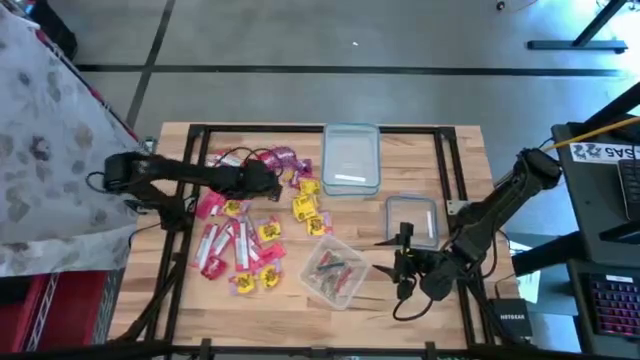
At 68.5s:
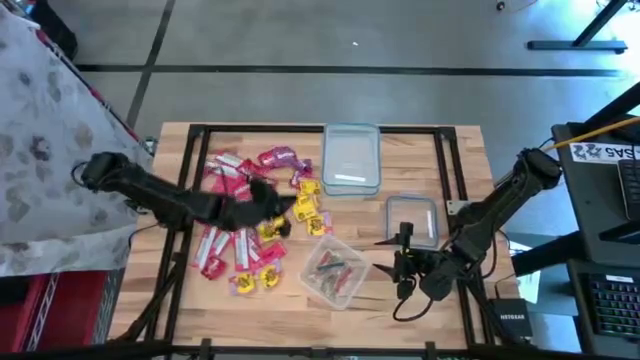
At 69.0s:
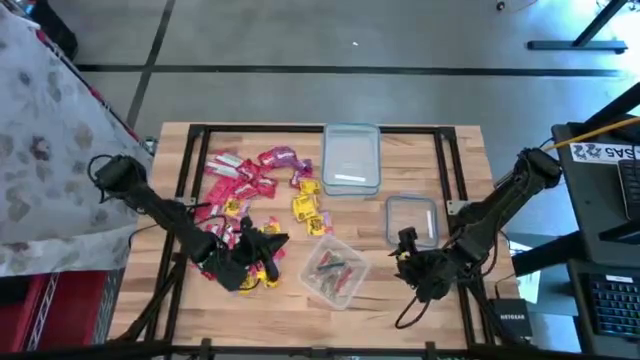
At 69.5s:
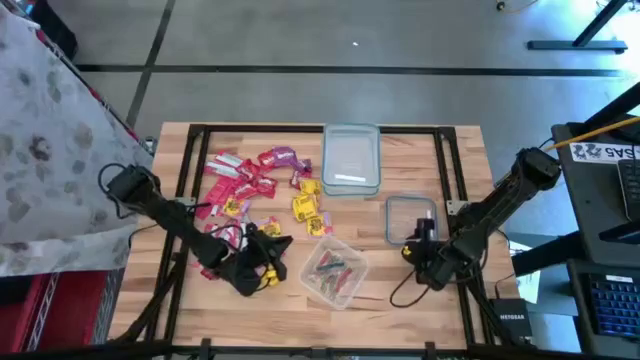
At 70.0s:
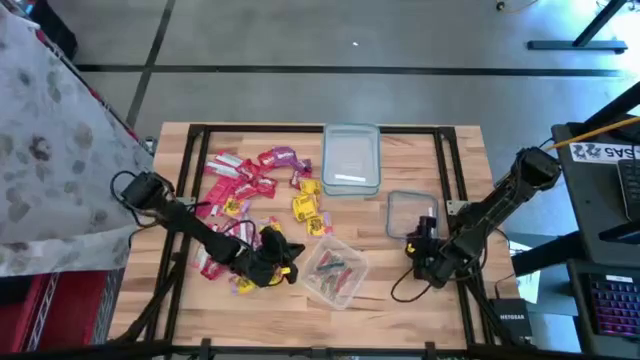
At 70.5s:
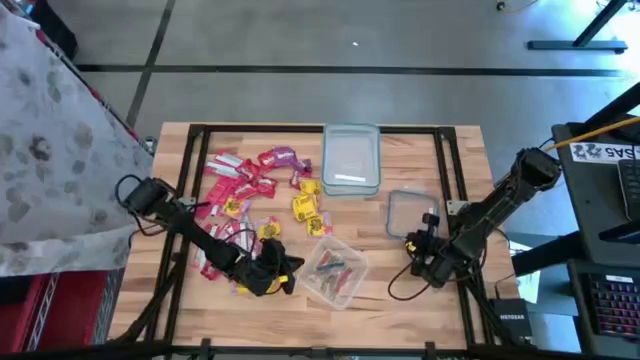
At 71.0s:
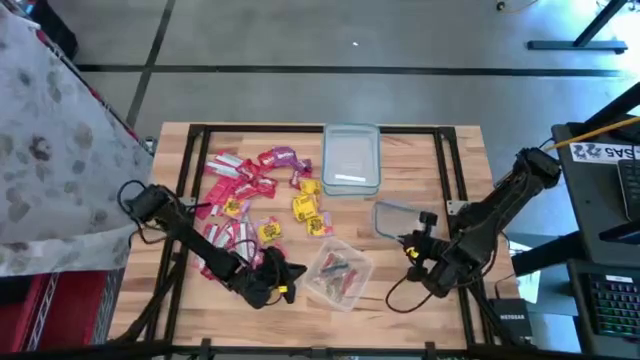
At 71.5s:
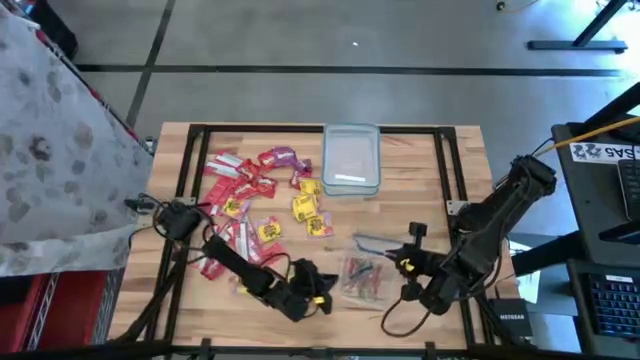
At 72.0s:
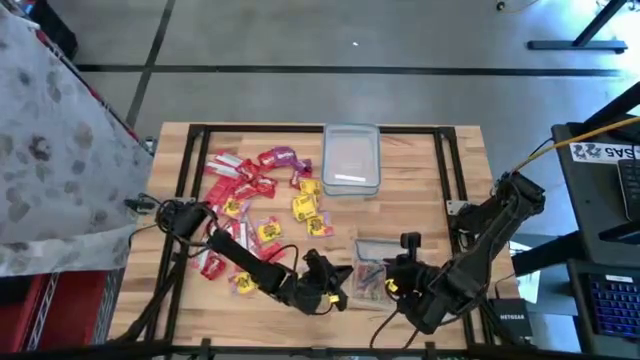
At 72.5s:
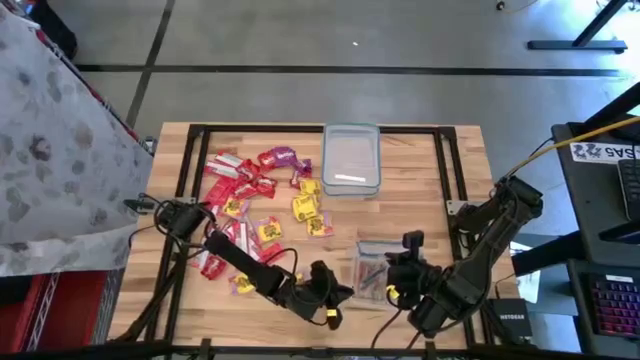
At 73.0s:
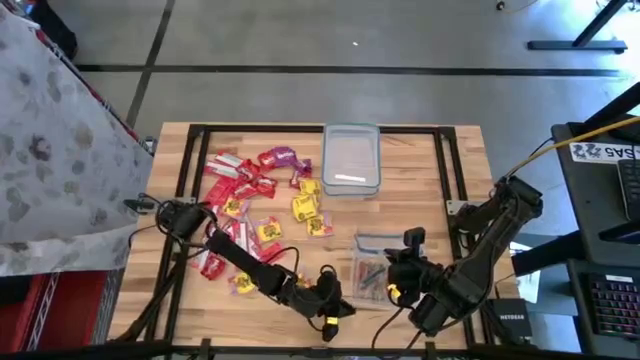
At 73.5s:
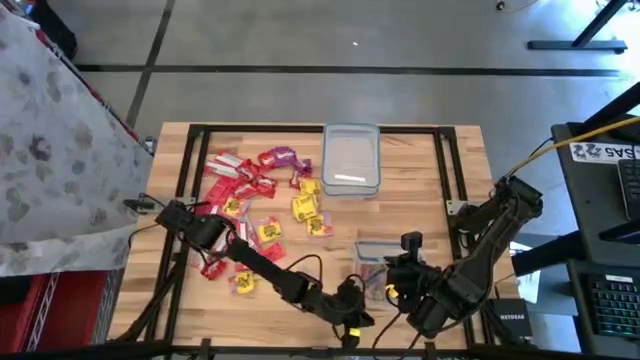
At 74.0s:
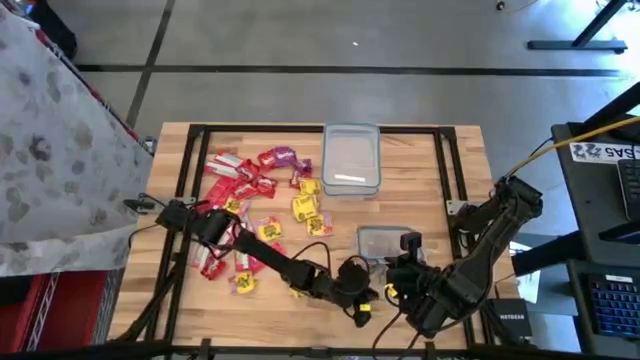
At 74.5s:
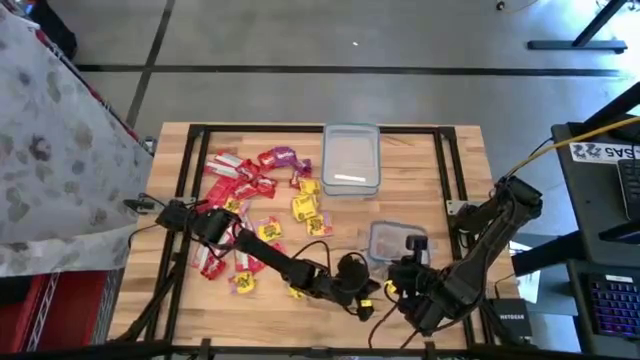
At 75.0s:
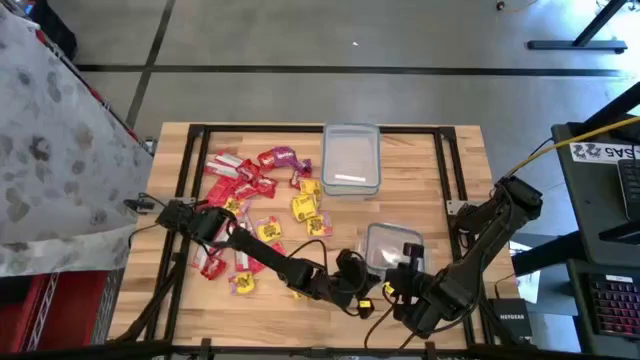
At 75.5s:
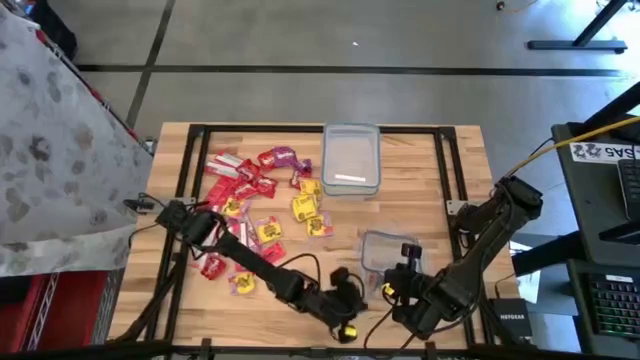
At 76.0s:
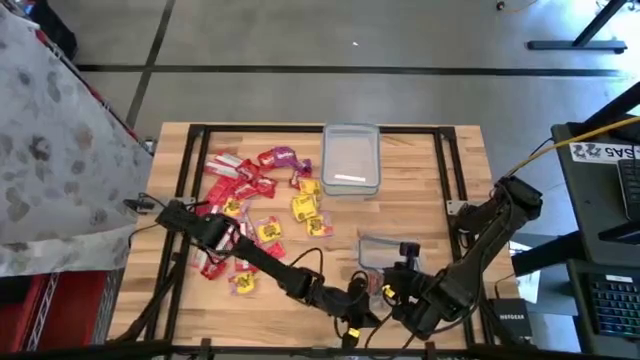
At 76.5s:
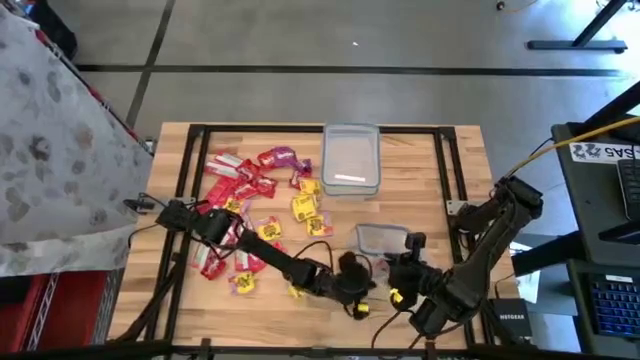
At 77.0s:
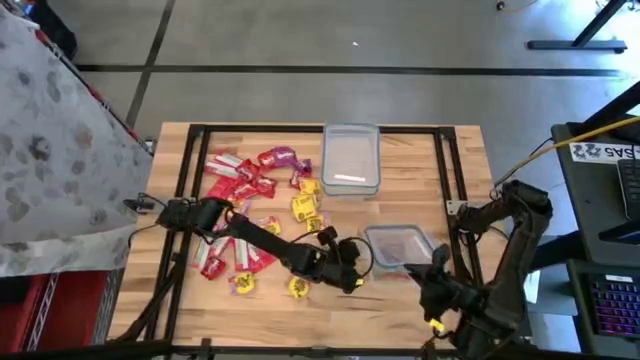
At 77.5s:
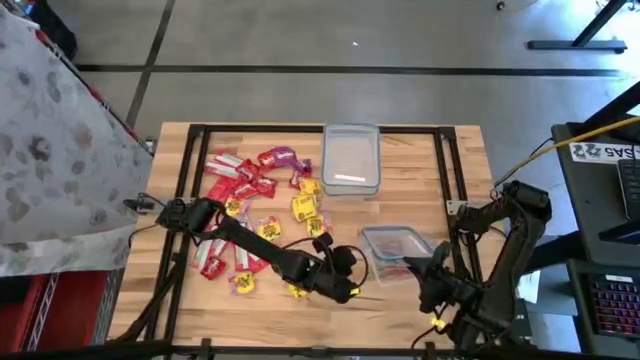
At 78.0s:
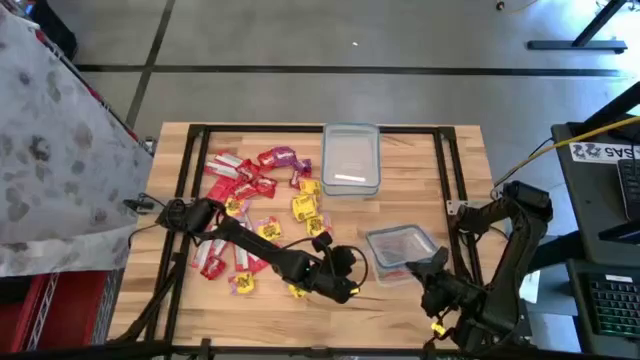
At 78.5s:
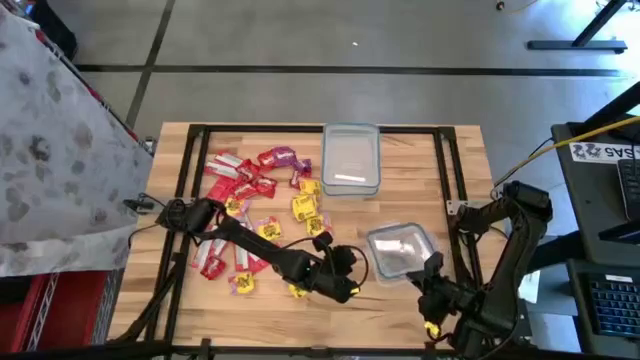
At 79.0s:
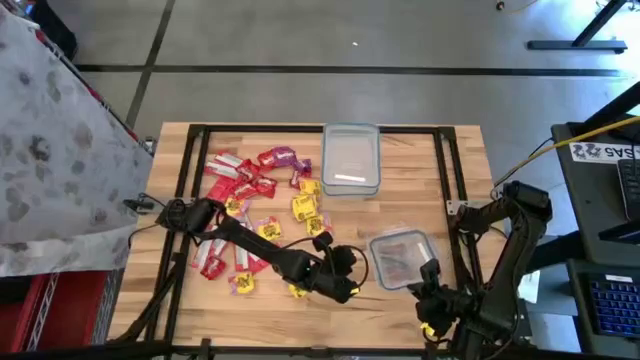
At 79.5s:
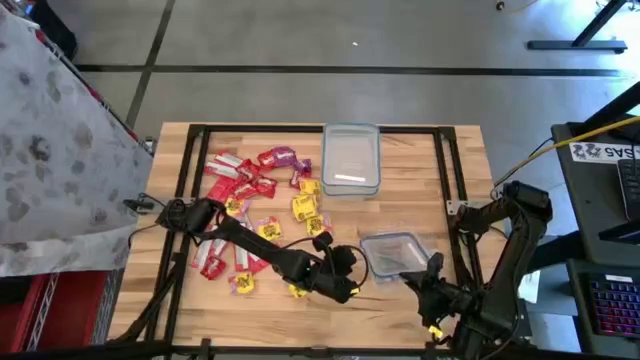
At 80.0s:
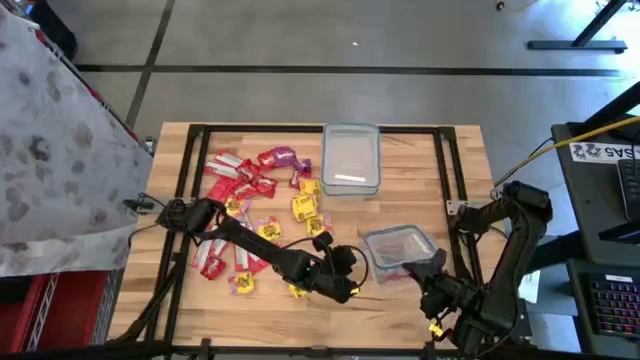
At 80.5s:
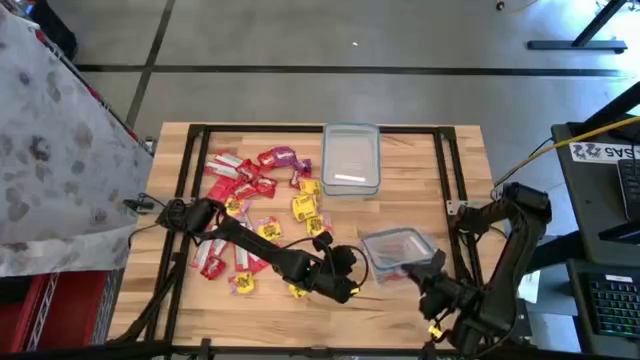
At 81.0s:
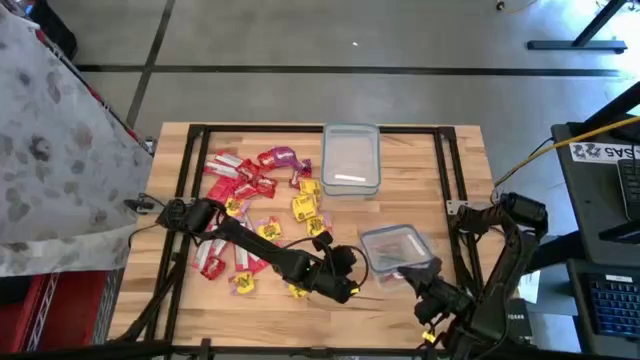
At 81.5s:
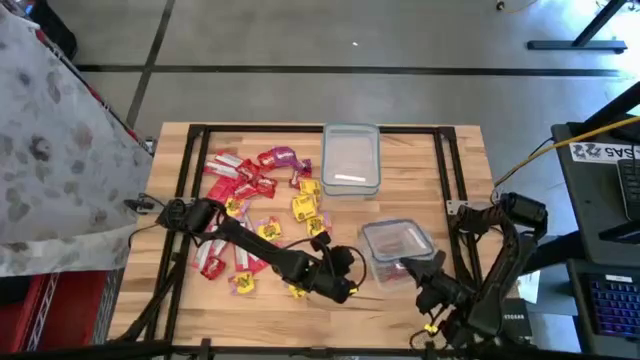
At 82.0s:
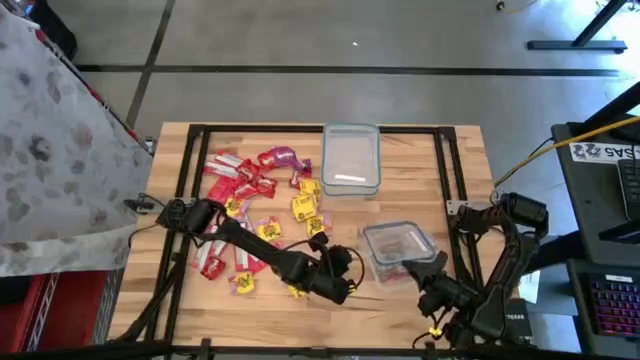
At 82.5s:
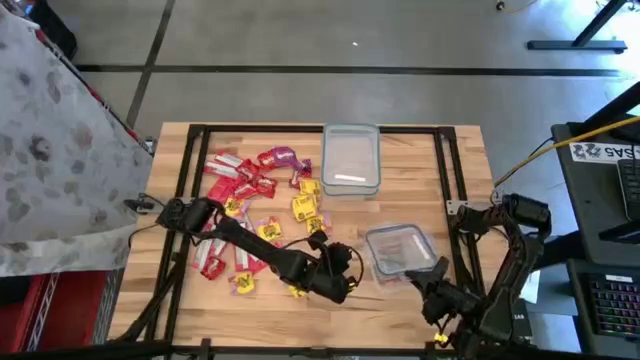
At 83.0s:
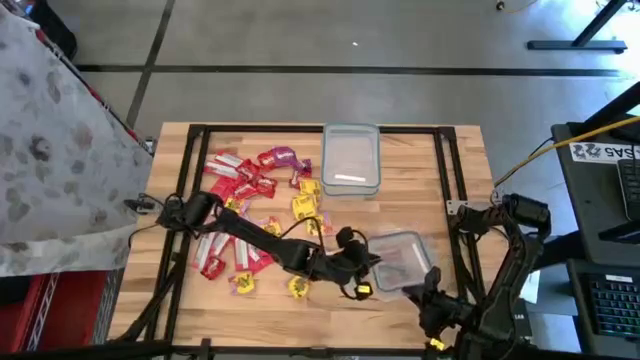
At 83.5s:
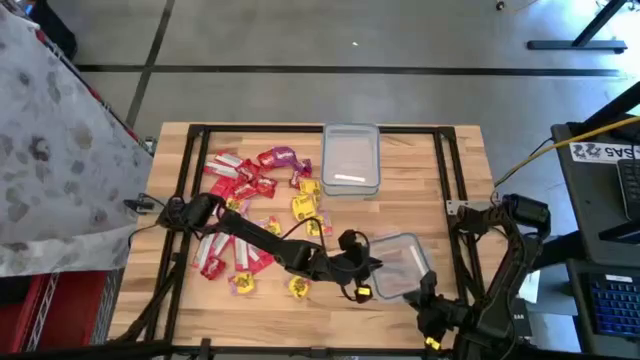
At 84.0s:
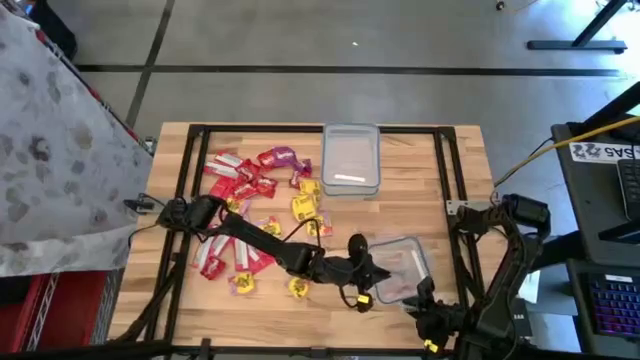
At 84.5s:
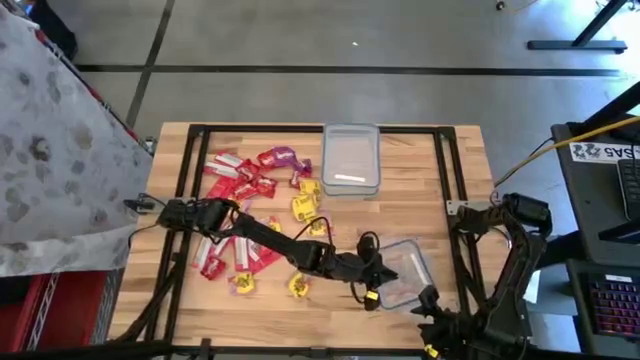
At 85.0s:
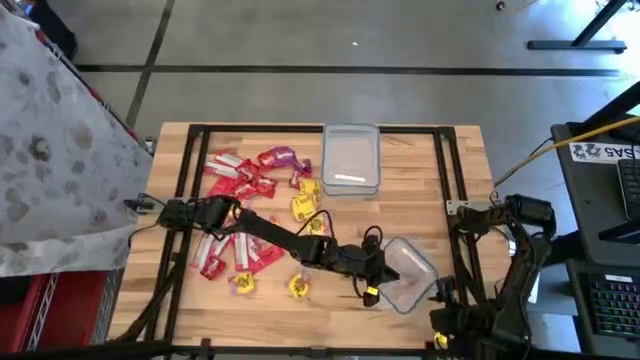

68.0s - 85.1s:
Task: Sort candy
Close the square transparent food container

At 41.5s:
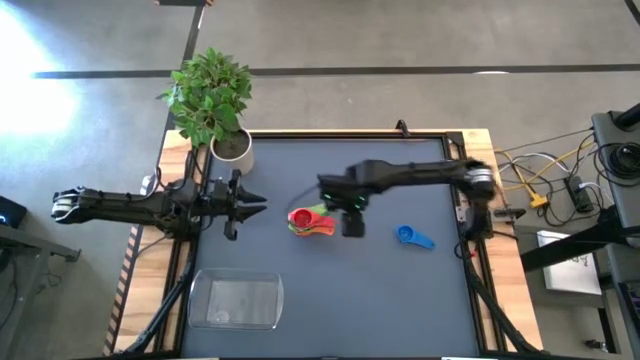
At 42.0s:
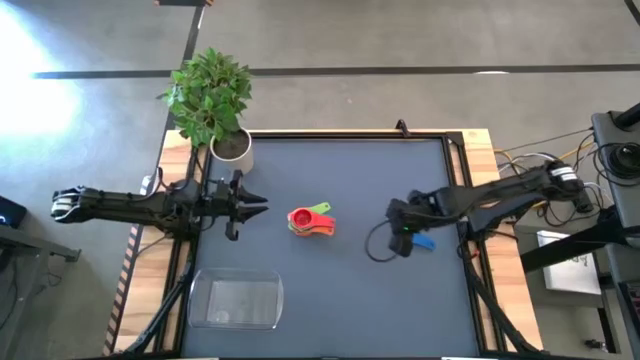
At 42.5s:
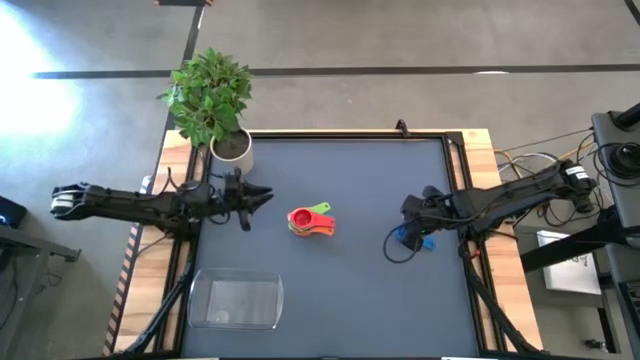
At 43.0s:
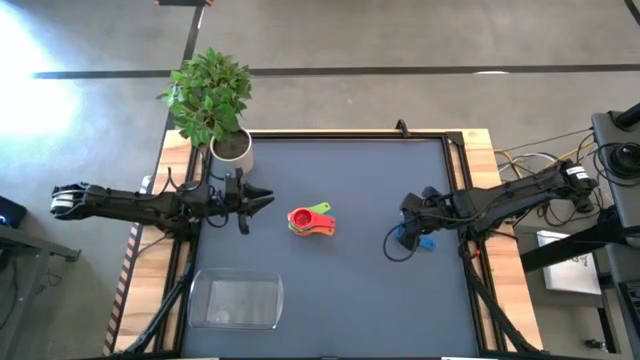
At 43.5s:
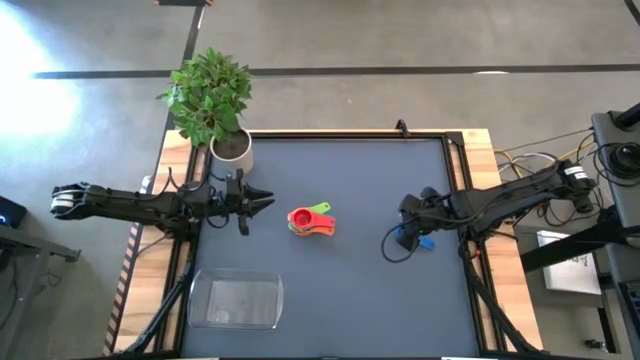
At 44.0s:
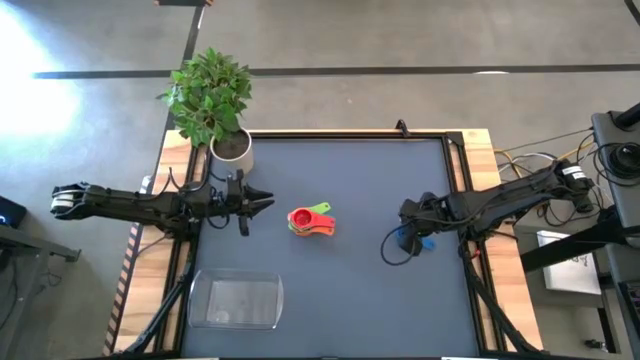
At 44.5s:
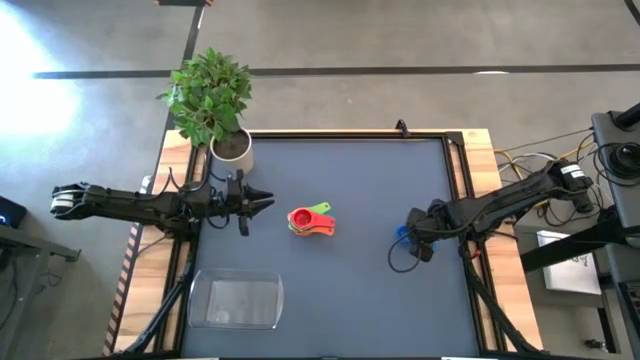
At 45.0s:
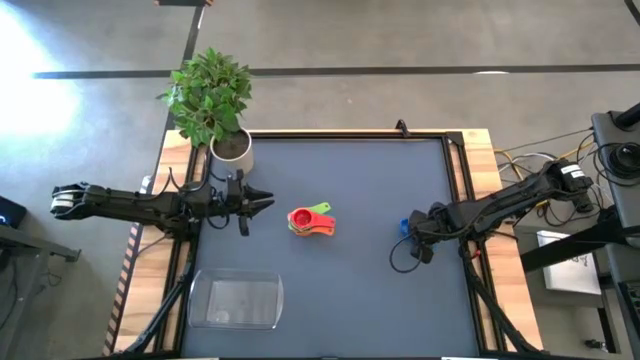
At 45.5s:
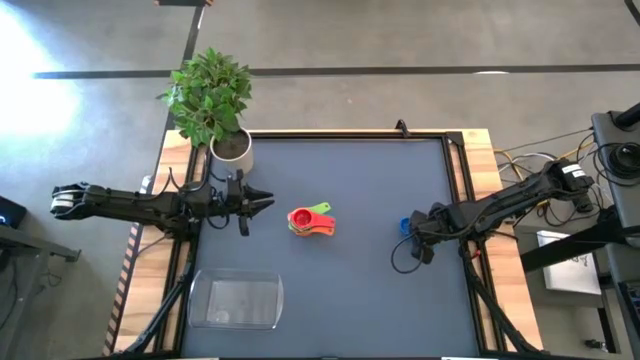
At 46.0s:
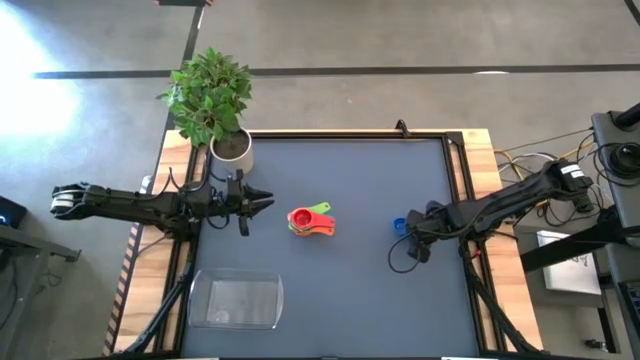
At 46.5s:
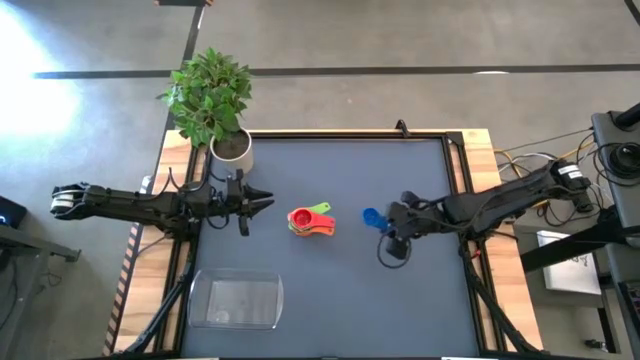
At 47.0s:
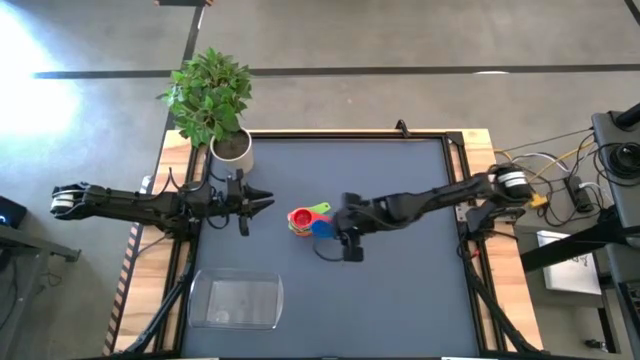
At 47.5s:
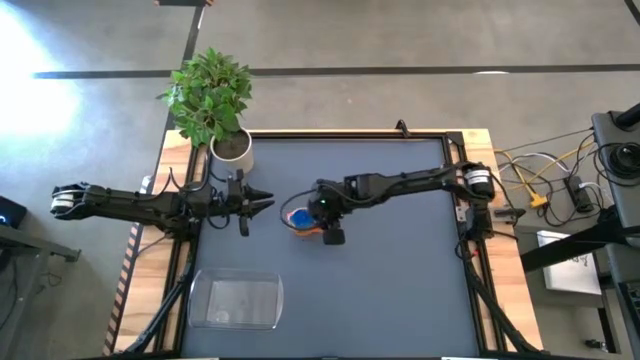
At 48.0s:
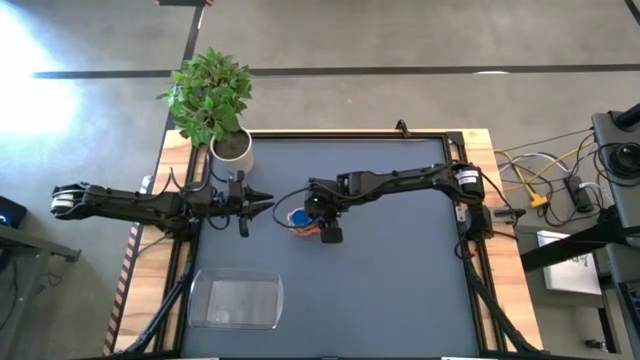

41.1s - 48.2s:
Task: Nest measuring cups in basket
Stack the blue measuring cup on top of the red measuring cup
